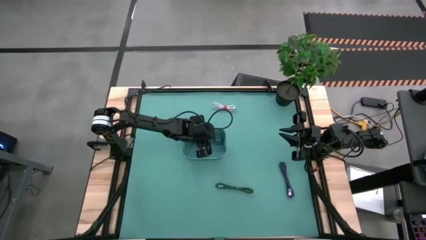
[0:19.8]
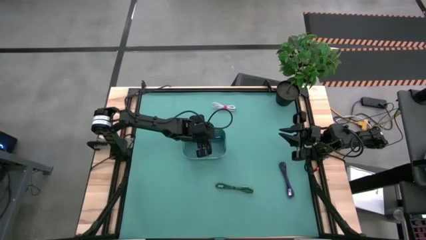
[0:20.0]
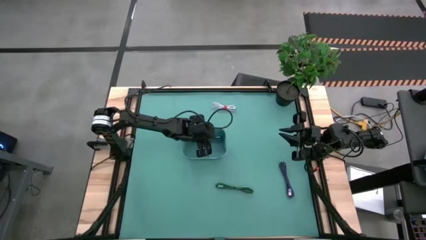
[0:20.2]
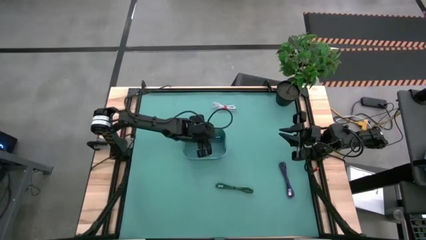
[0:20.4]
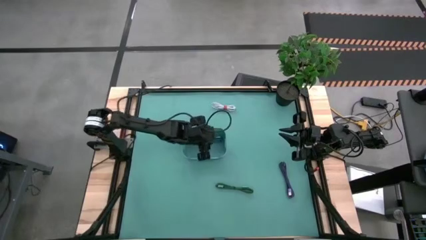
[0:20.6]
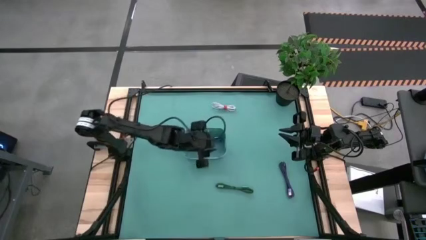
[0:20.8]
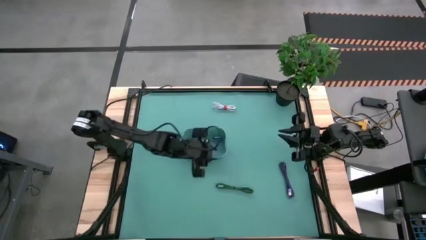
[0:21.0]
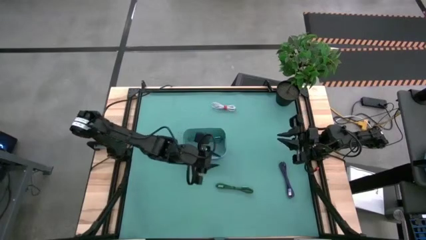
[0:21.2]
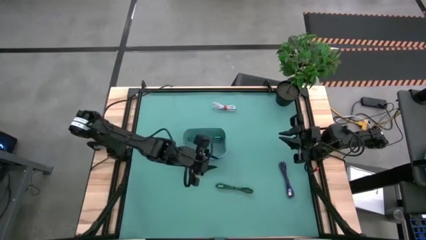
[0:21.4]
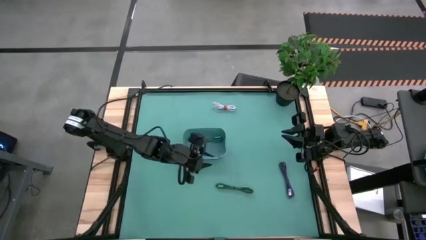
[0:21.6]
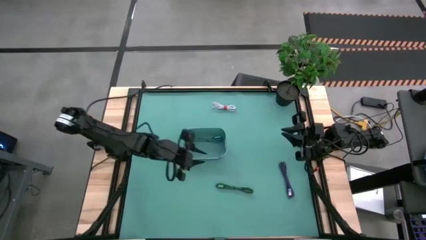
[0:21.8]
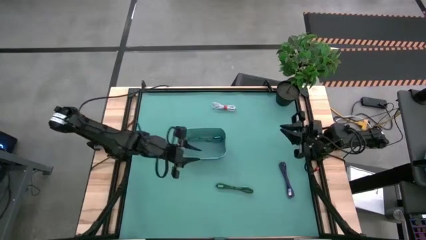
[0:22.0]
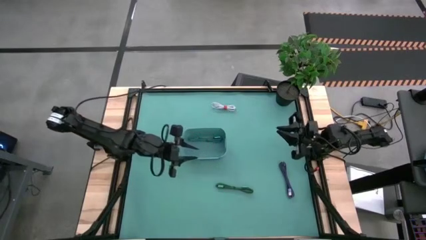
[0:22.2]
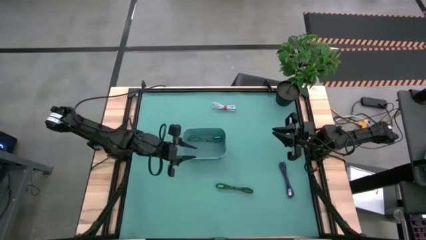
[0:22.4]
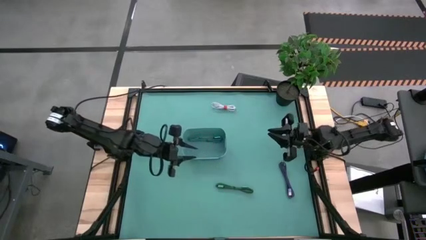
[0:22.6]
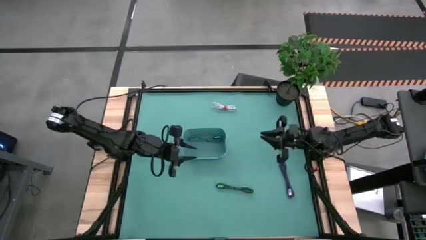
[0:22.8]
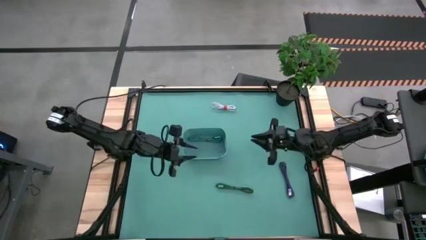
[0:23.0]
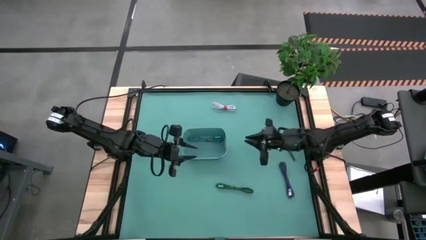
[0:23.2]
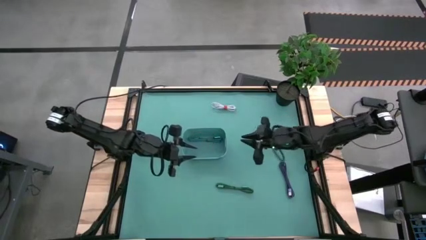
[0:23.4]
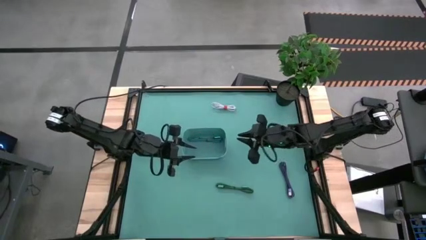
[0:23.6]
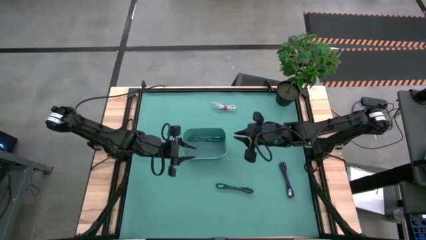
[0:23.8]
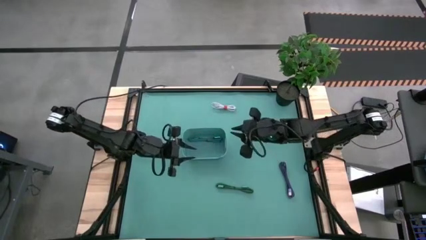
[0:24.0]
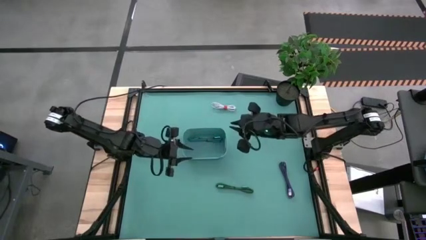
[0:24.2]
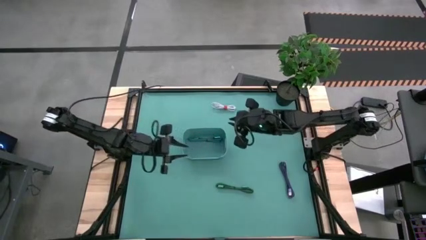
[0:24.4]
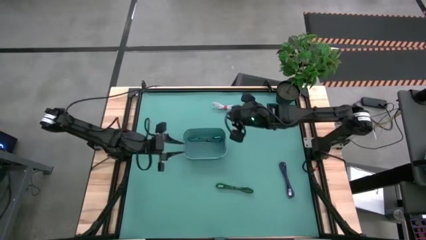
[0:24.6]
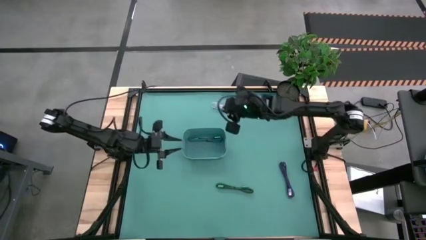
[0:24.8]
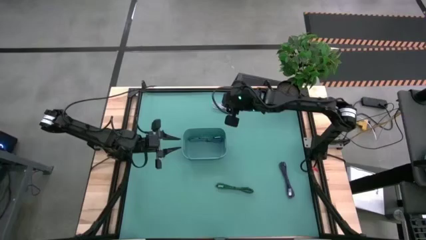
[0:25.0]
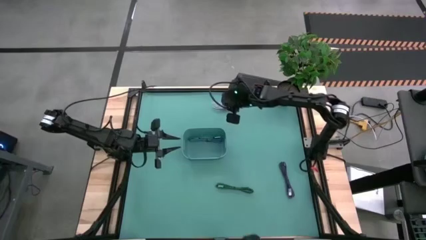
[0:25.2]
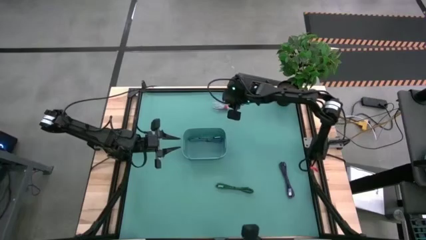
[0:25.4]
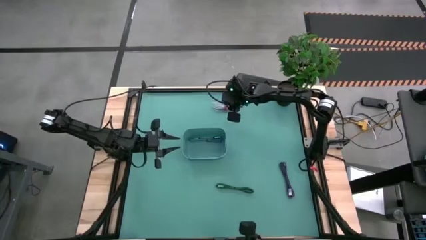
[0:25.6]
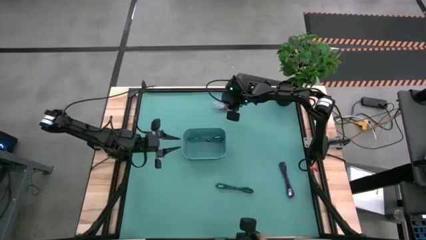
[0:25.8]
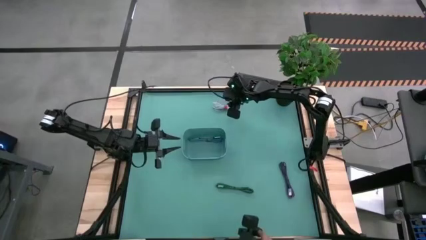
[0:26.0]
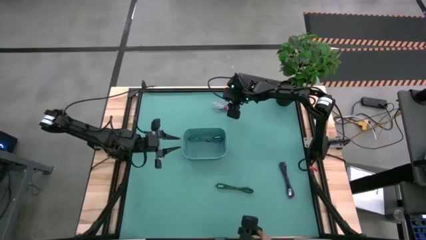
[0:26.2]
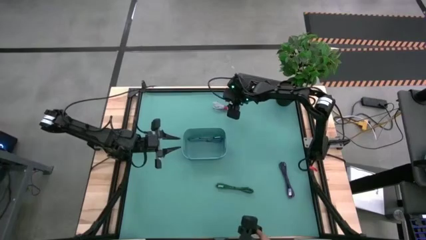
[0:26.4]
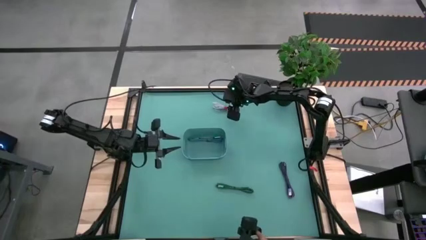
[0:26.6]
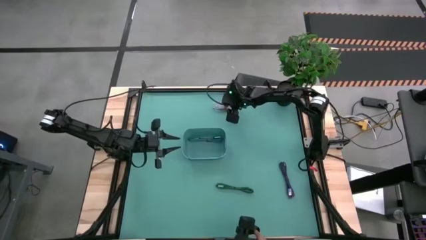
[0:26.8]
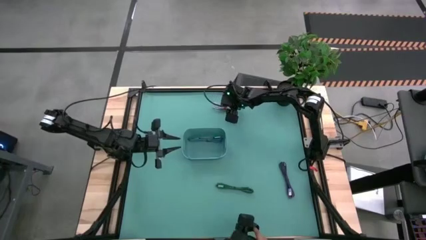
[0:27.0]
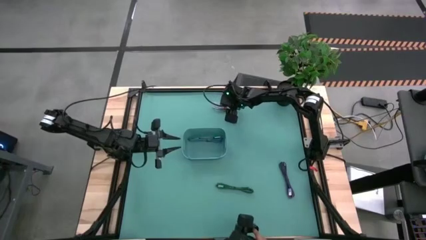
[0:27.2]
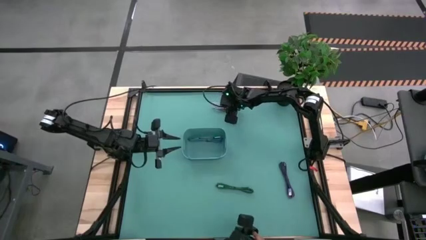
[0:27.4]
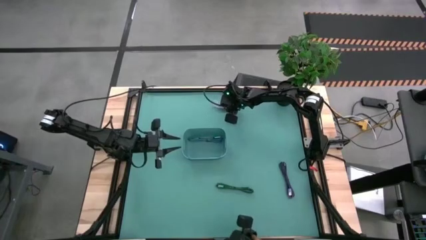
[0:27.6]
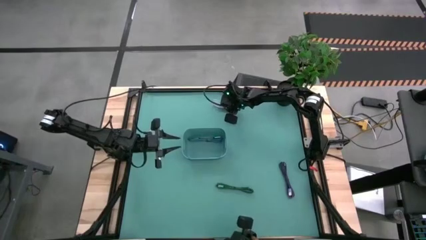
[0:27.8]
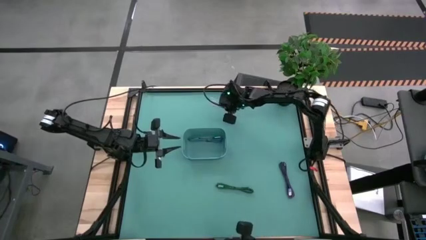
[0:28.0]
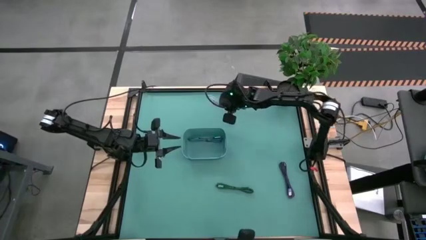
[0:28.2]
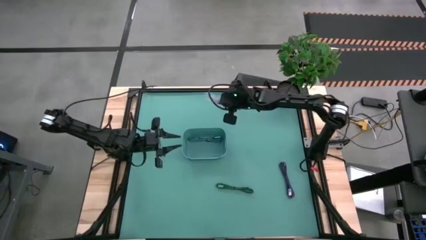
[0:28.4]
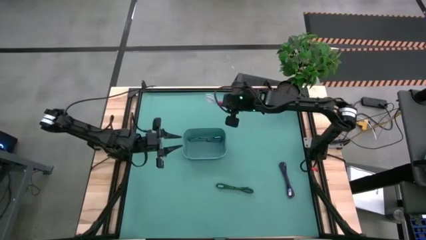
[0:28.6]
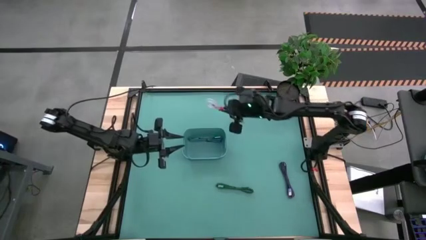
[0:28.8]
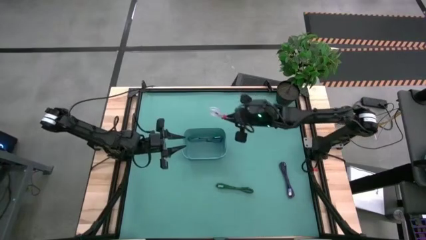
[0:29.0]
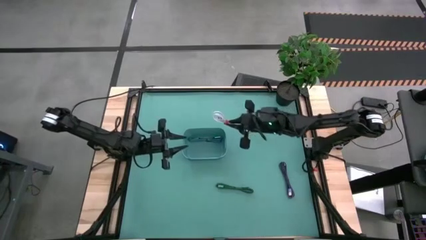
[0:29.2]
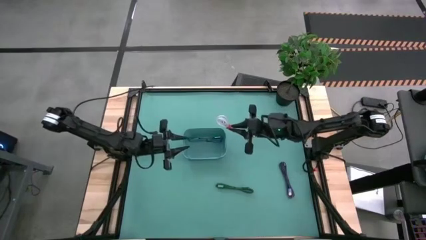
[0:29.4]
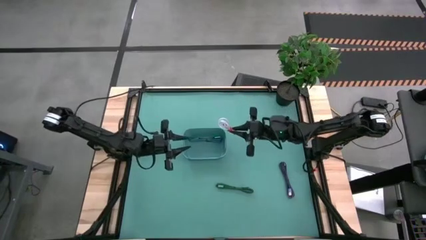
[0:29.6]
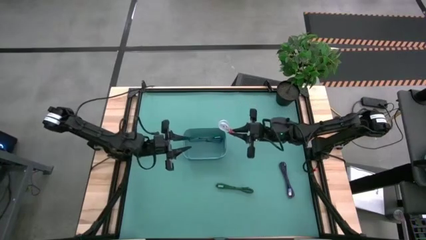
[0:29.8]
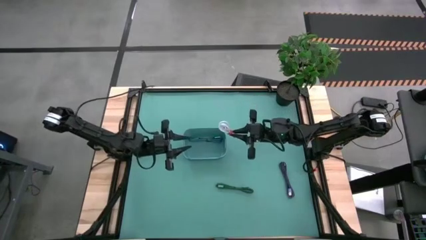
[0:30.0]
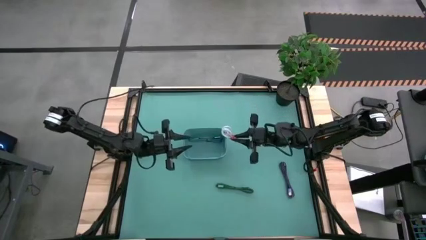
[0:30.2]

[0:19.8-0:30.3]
Task: Pick and place USB-C Cables
Put the white charger cable into the green bin

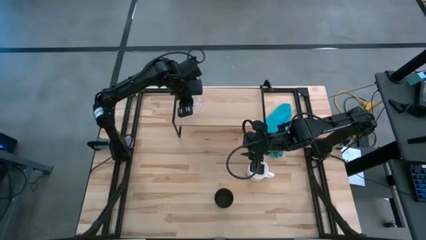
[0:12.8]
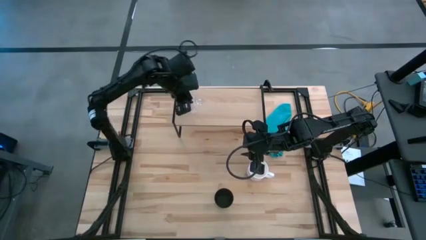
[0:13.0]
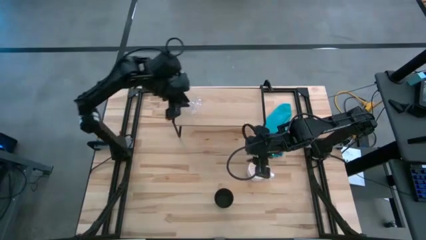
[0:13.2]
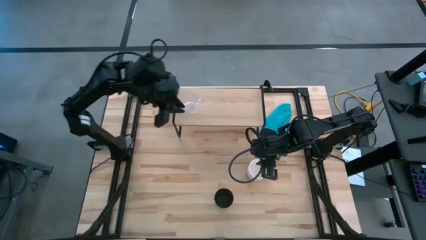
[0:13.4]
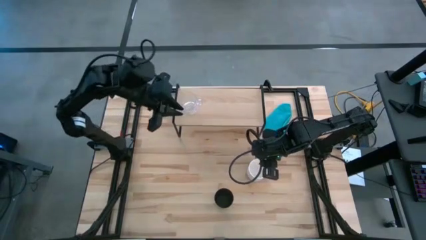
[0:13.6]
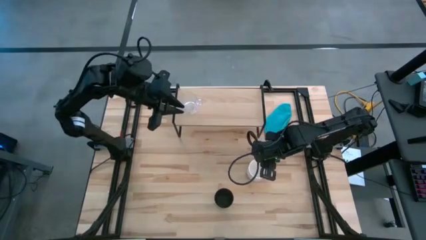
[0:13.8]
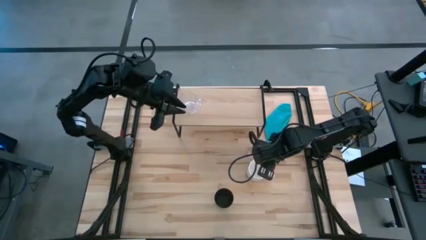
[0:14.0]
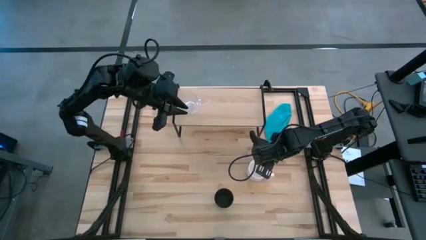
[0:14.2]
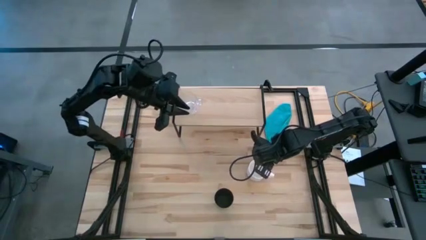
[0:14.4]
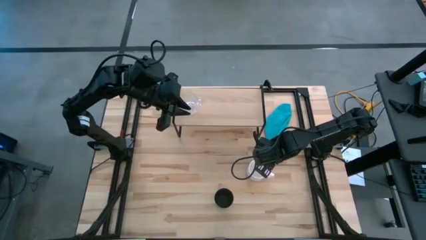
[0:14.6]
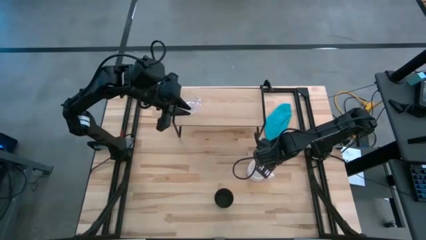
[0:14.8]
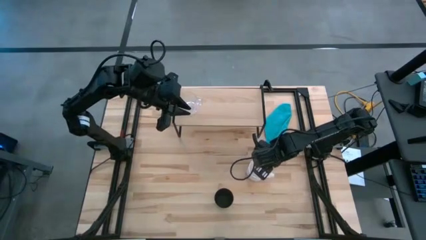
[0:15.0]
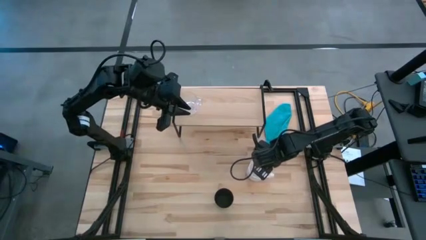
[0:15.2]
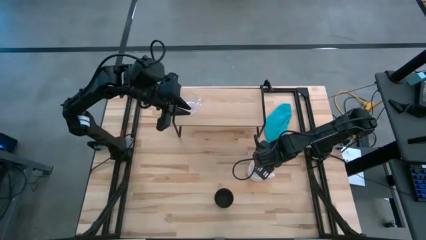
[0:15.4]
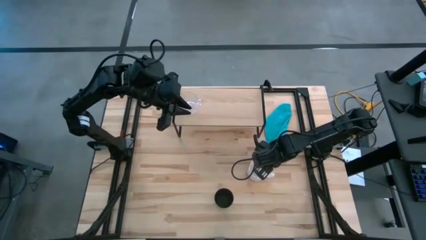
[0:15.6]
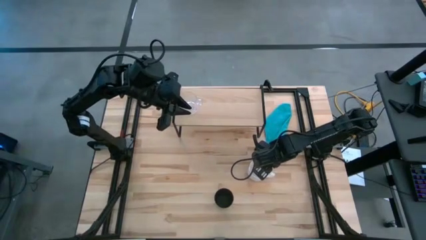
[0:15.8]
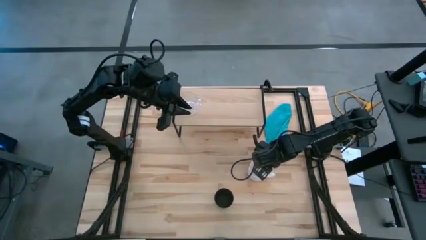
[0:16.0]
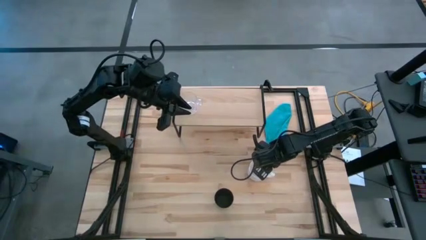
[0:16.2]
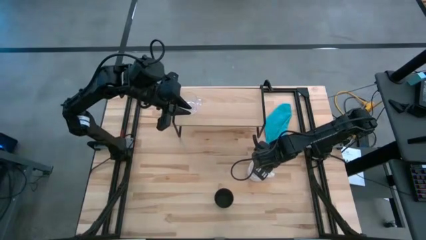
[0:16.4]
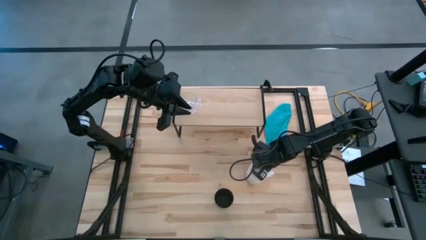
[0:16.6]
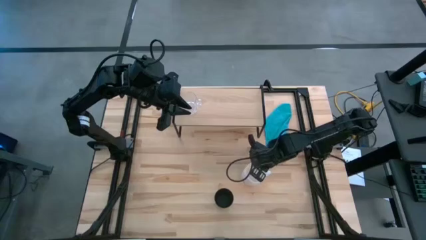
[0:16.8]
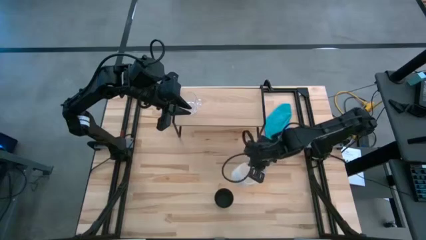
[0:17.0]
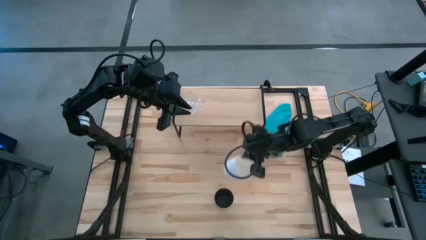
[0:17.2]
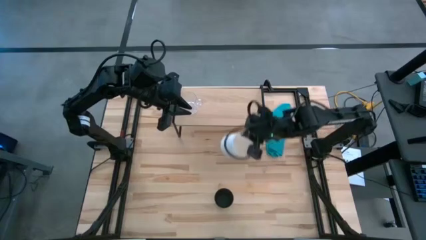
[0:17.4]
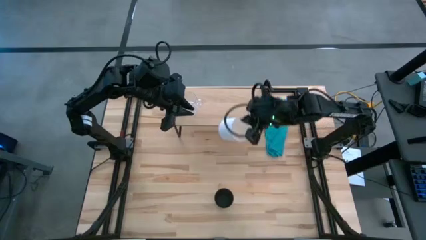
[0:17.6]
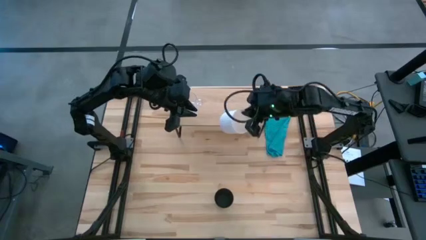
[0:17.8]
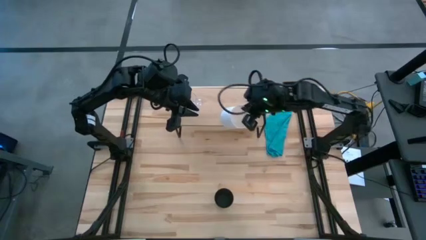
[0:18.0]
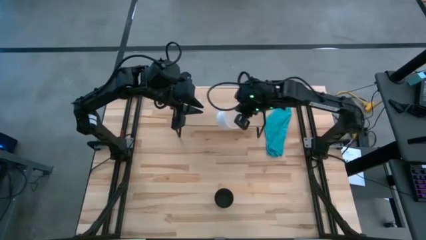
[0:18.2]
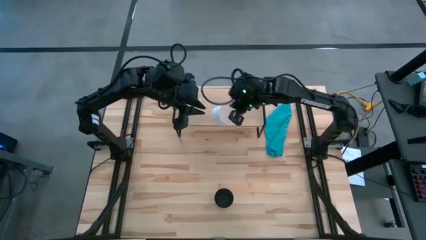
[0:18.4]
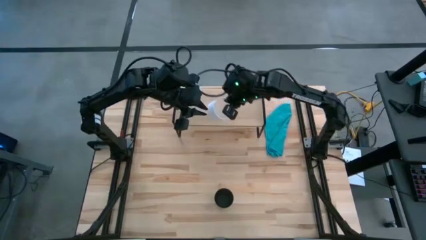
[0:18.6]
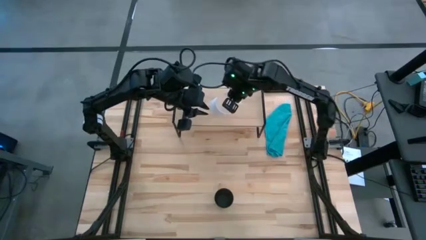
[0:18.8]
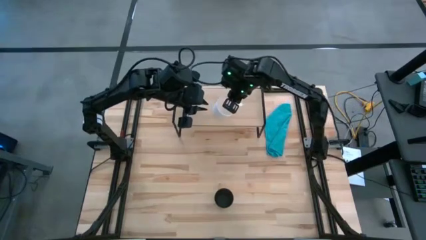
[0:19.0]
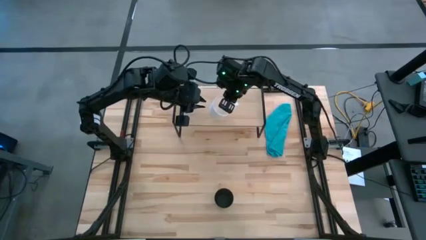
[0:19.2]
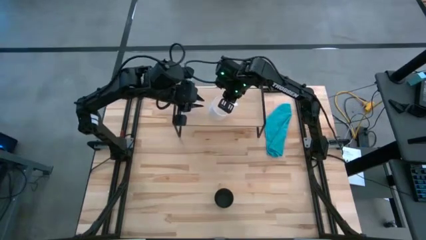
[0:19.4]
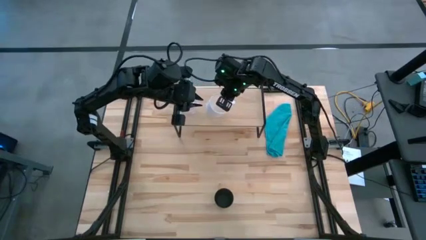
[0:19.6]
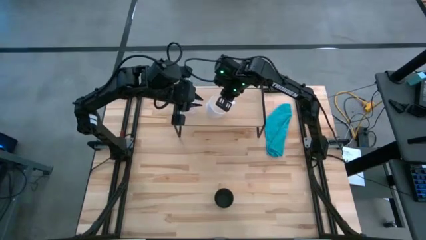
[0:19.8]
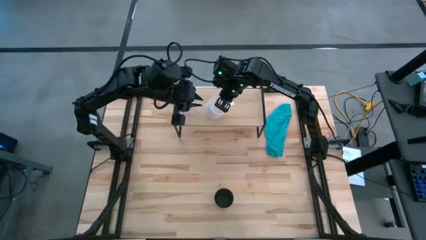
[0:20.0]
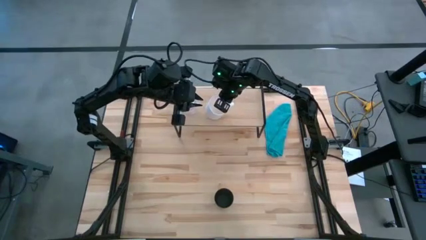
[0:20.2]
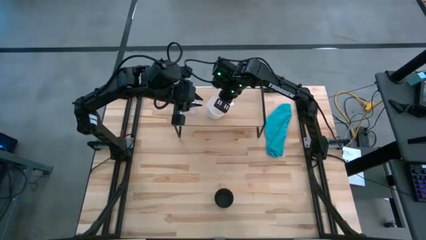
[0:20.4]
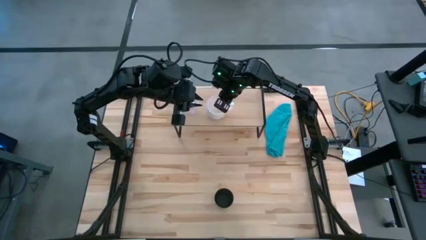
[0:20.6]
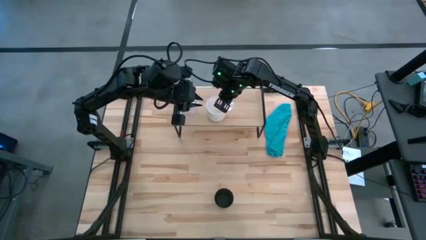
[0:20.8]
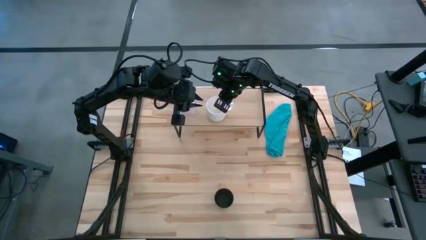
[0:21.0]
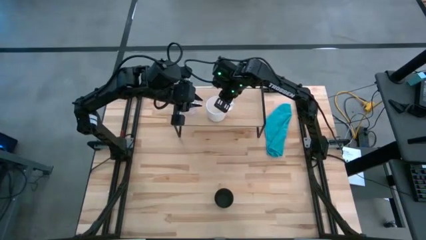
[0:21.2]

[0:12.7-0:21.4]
Task: Stack small to large cups/mugs on shelf
Put the white mug on the shelf
